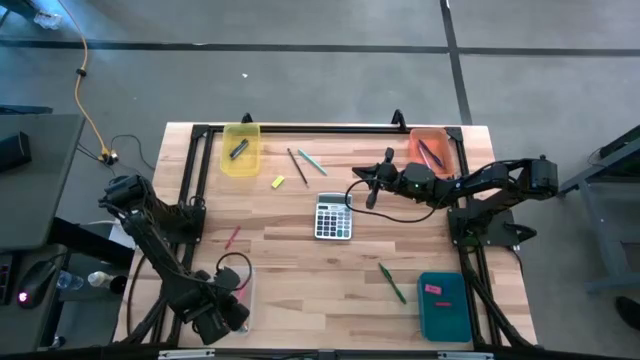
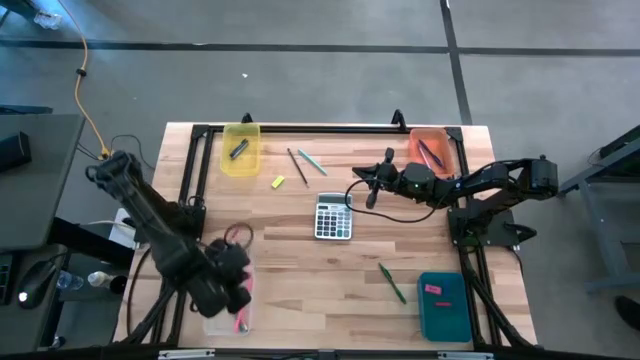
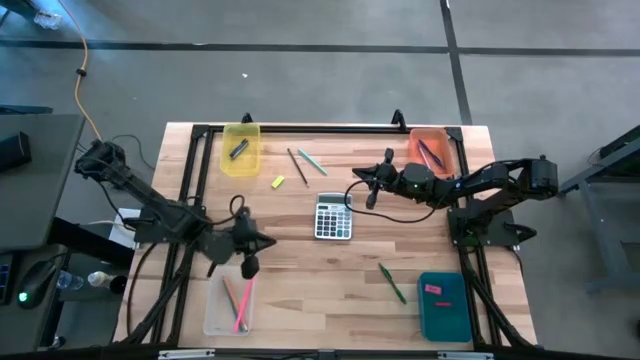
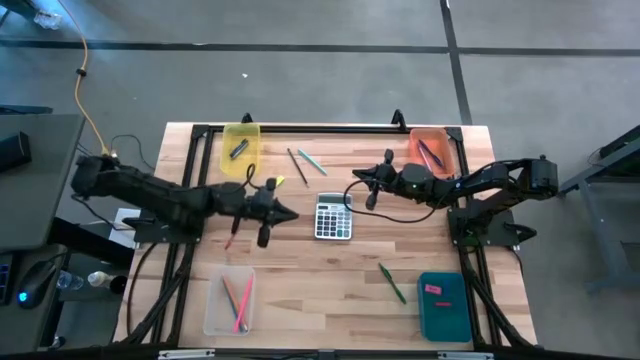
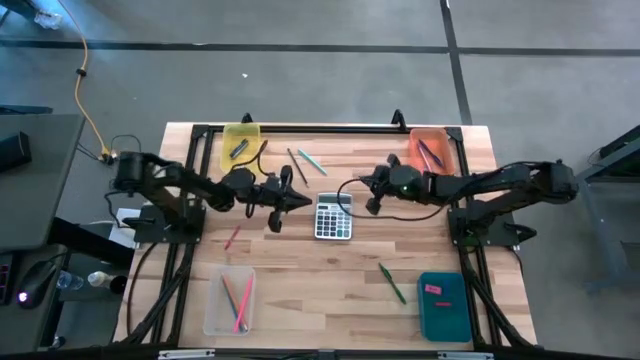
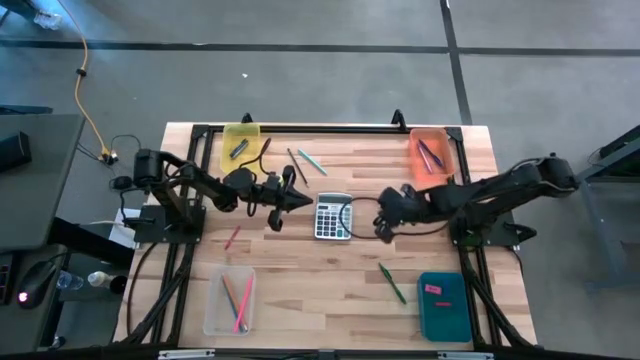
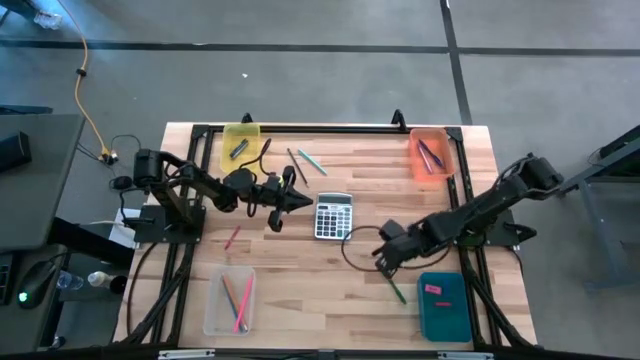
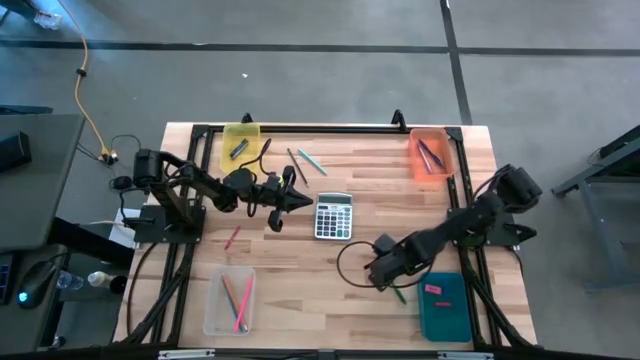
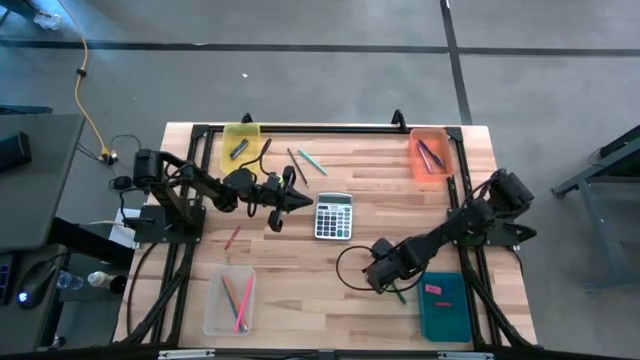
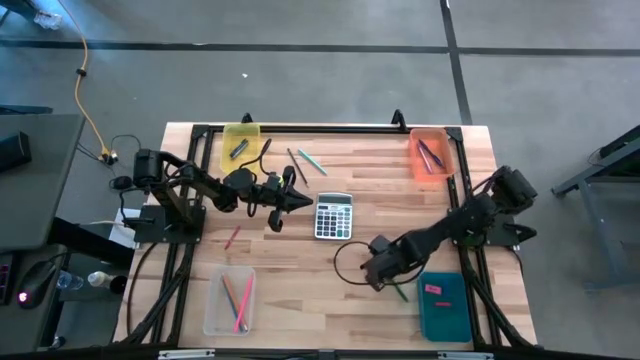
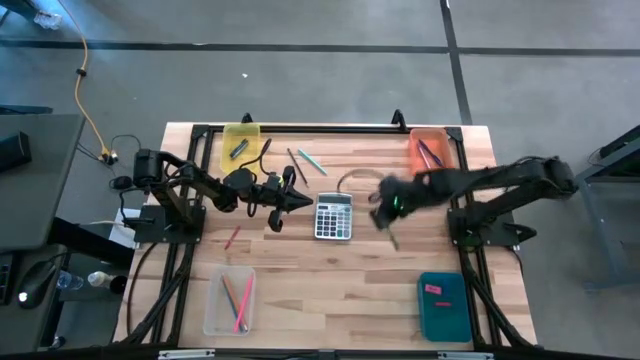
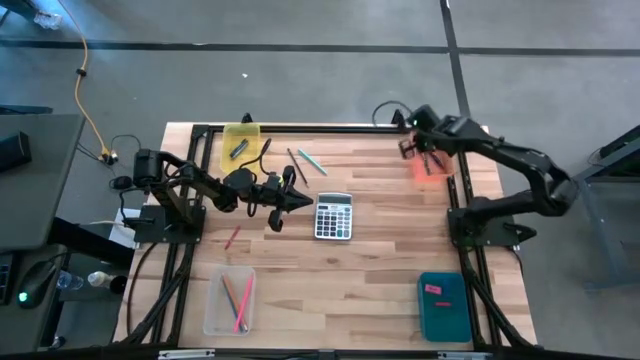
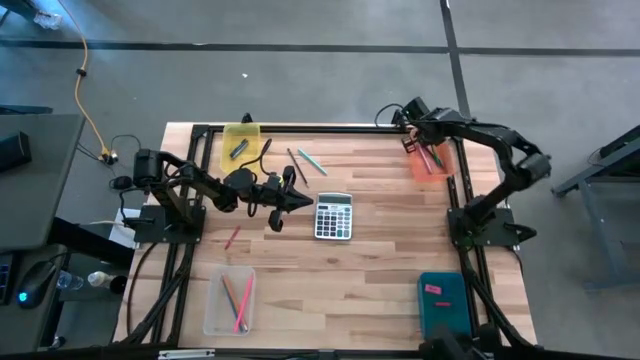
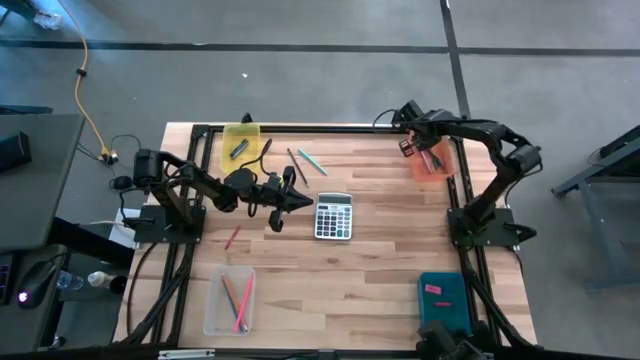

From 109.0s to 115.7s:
Task: Sort crayons/erasers/pens/pencils in bins
Put the green pen into the orange bin

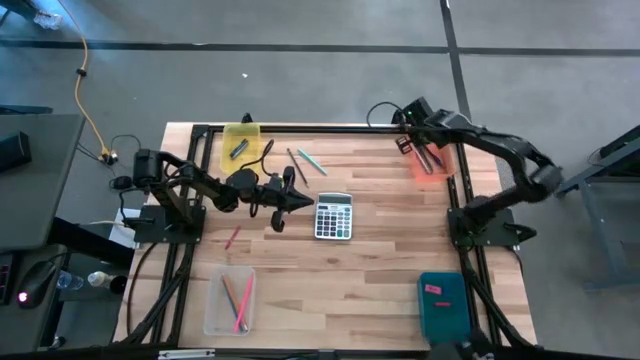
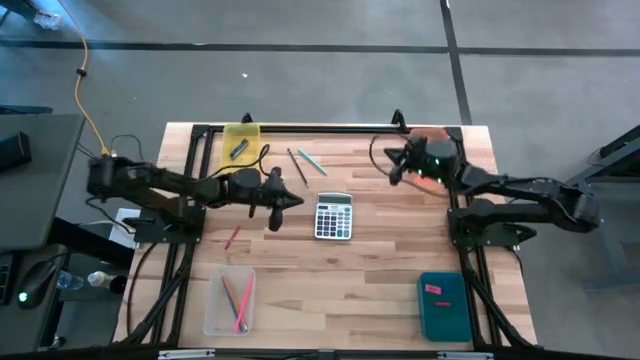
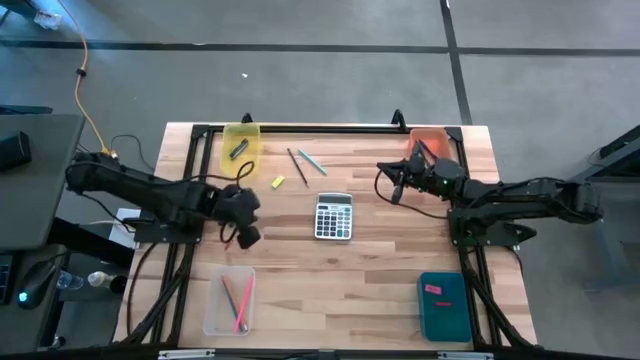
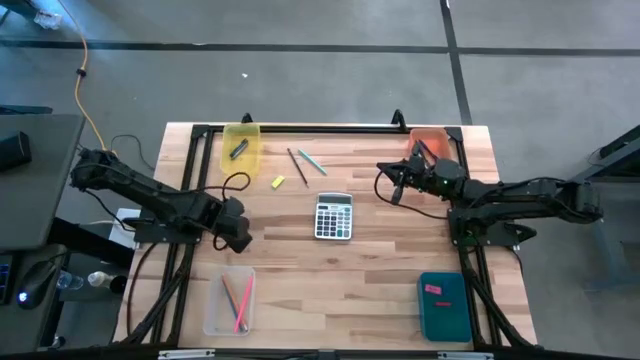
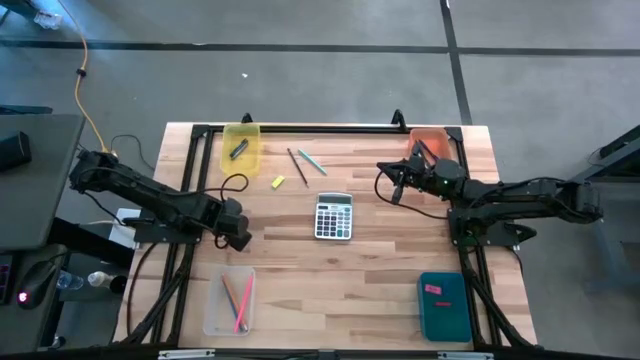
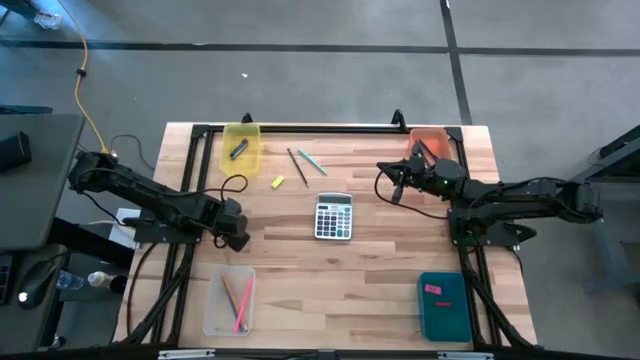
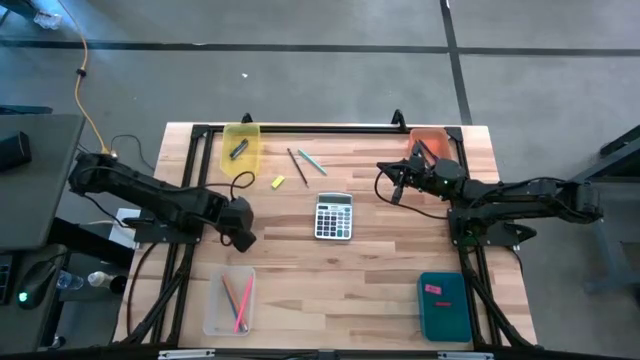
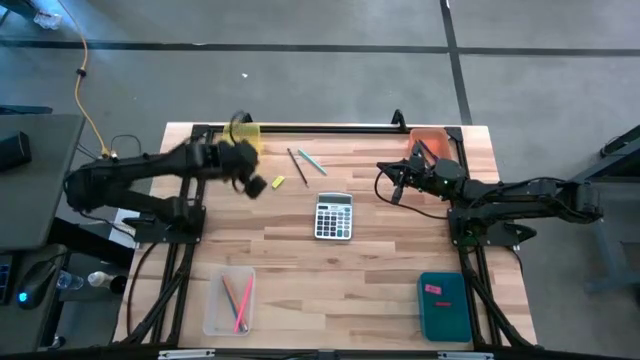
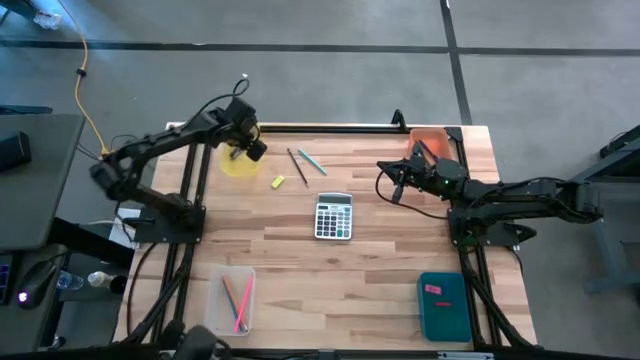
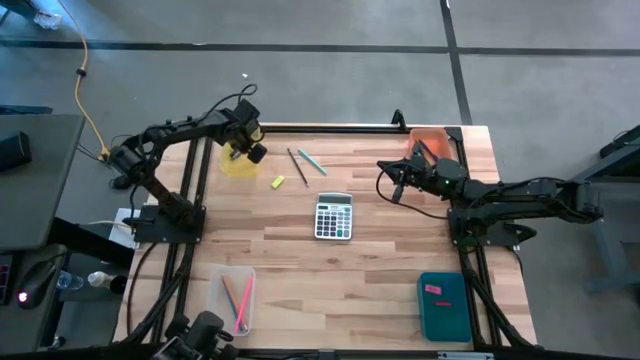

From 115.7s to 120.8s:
Put the red crayon into the yellow bin

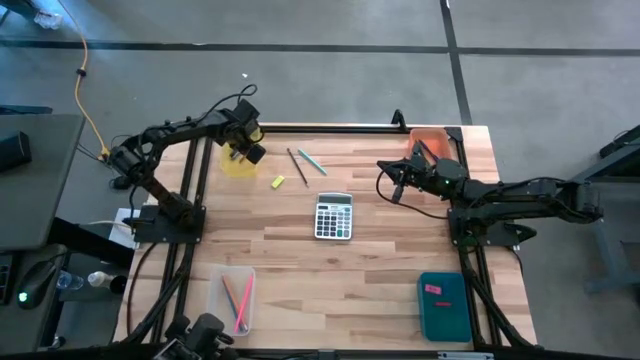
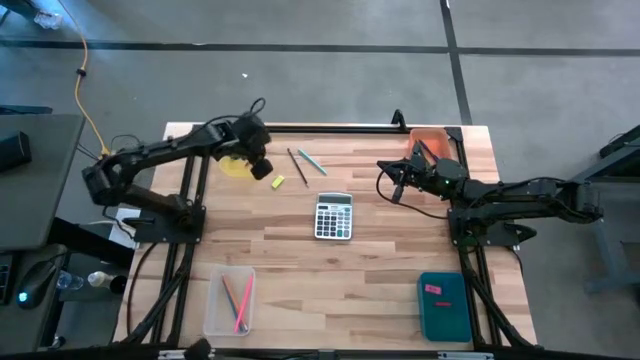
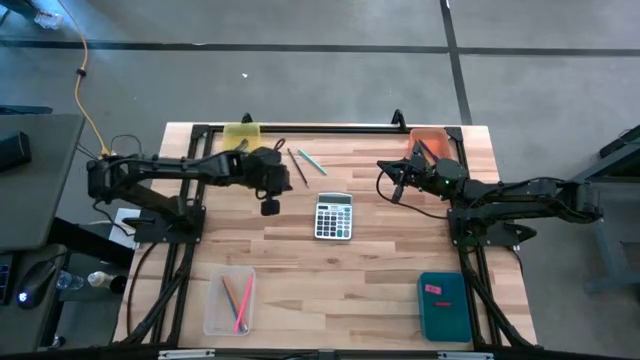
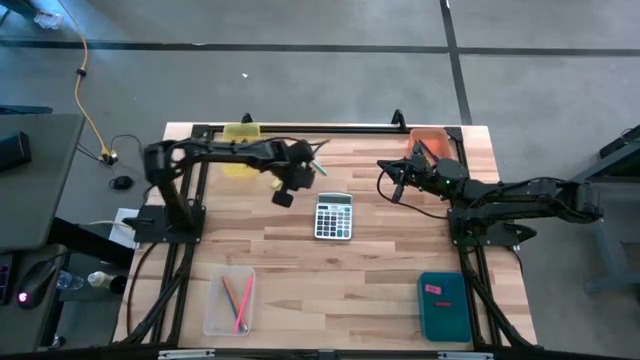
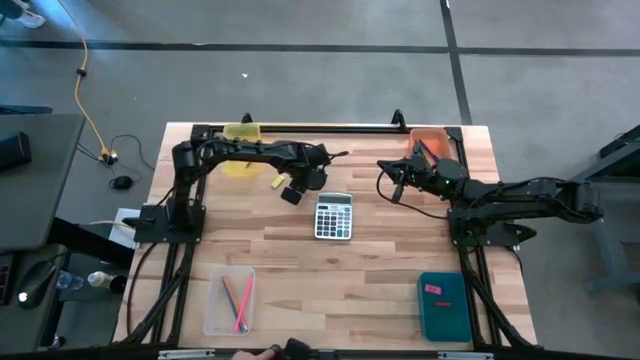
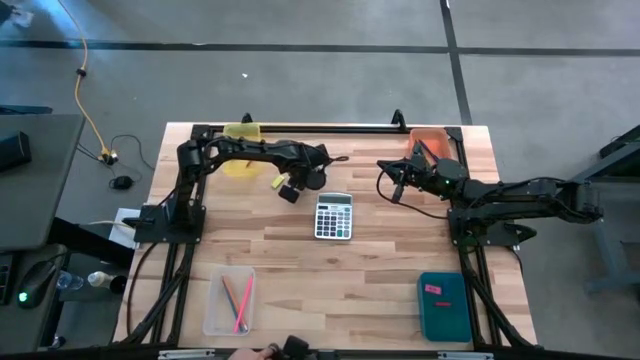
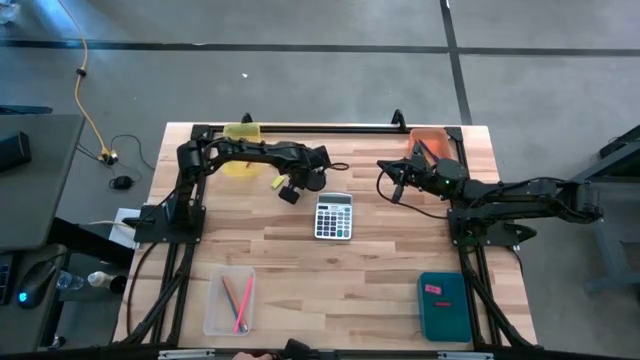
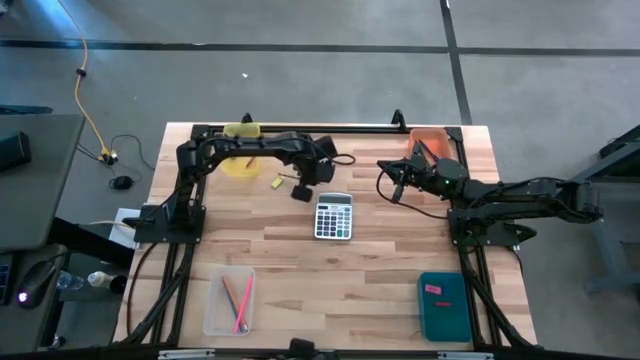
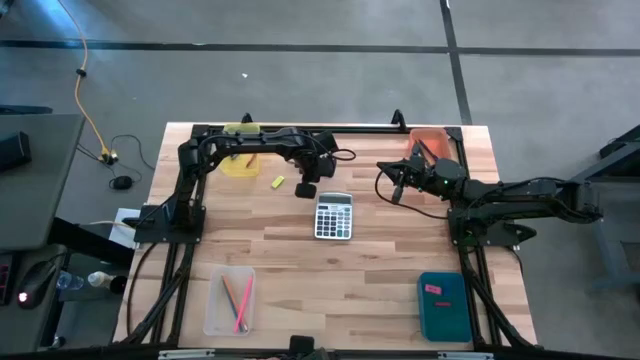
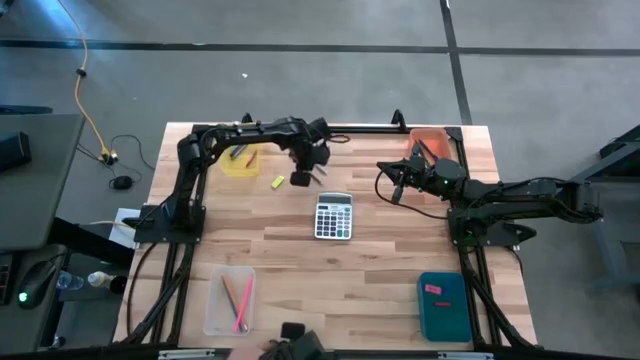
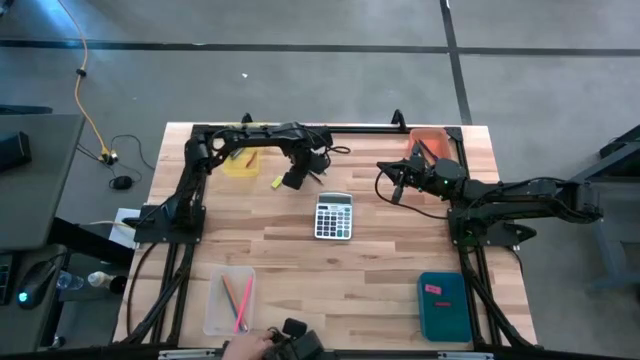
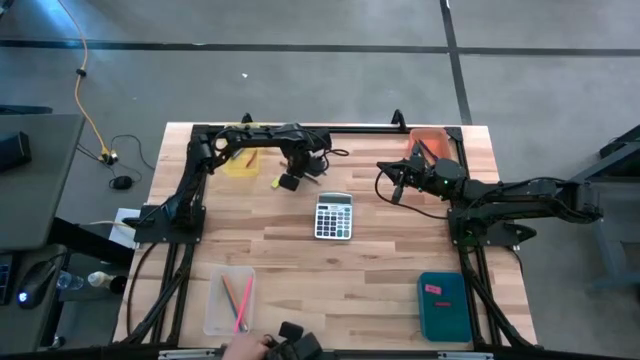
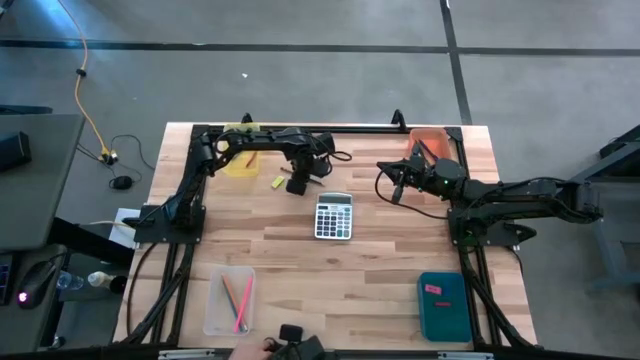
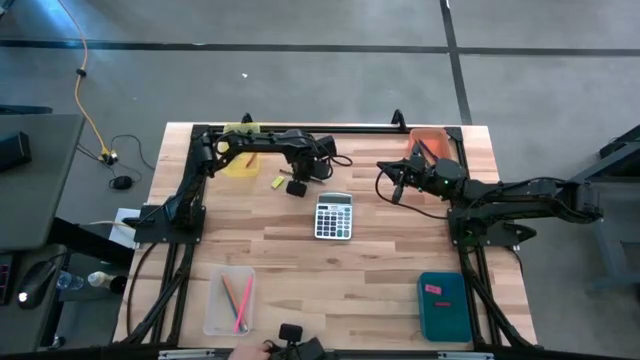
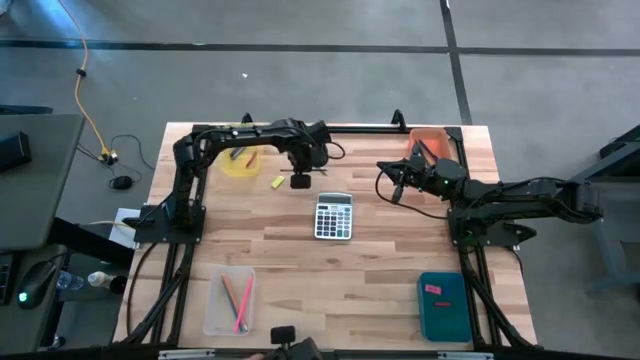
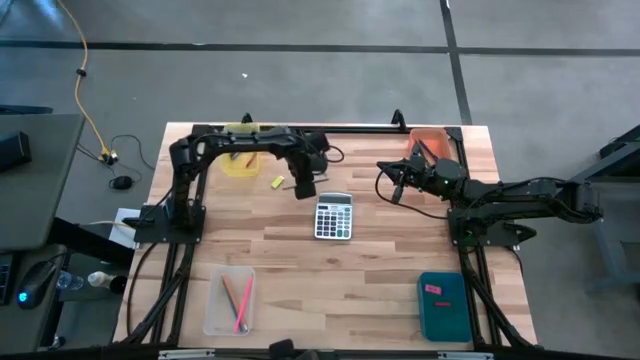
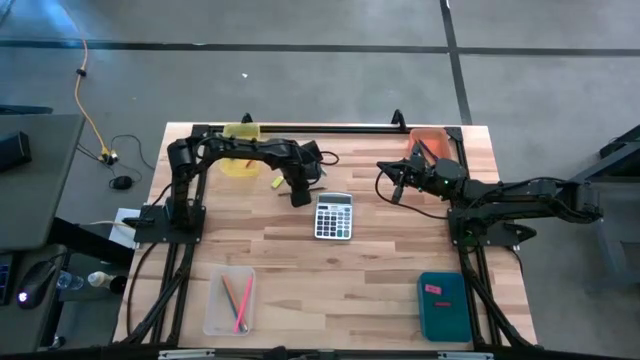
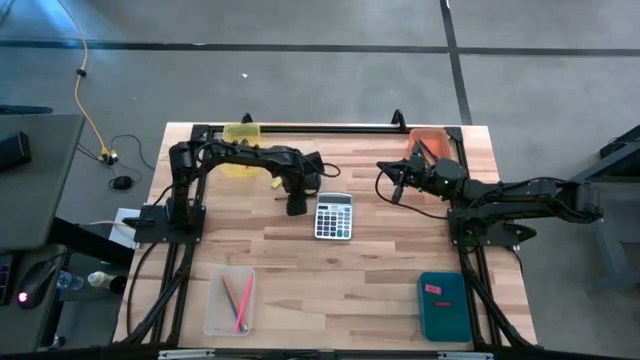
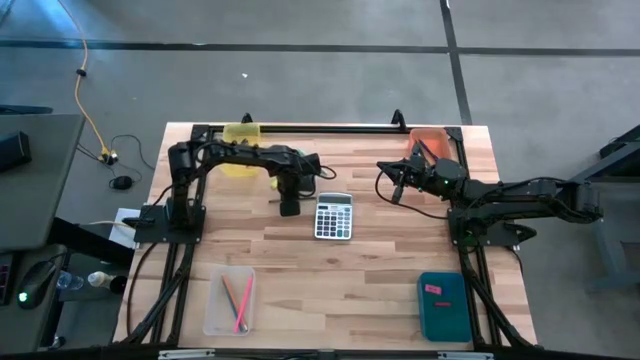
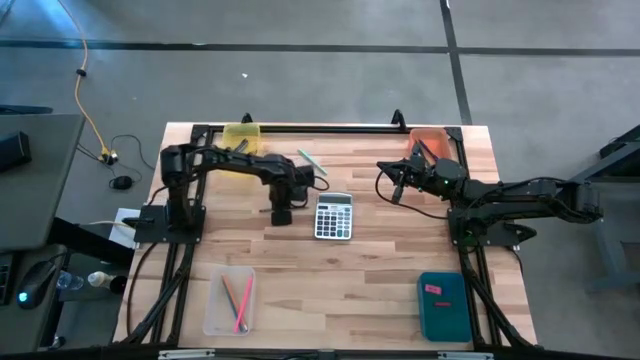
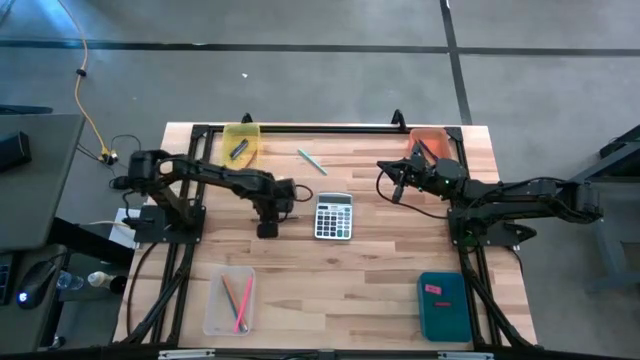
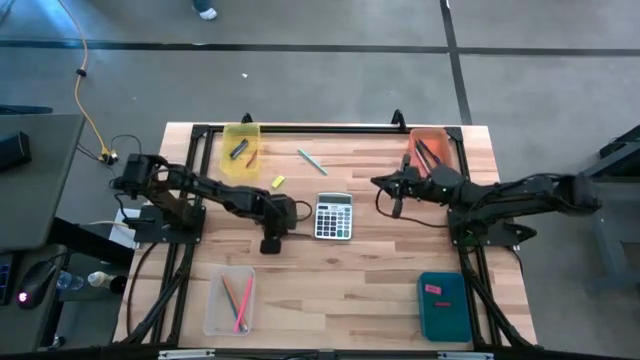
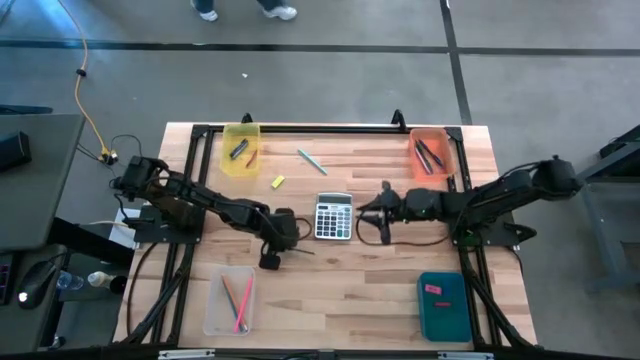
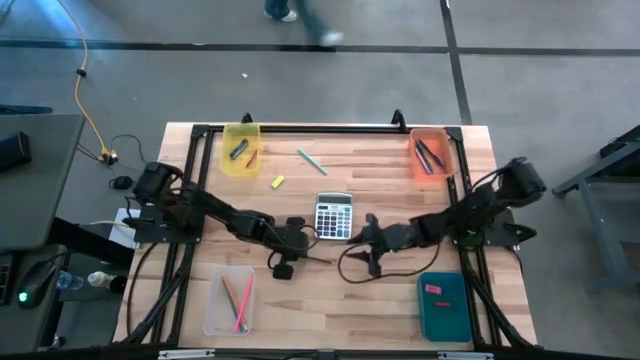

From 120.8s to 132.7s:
Put the black colored pencil into the transparent bin
